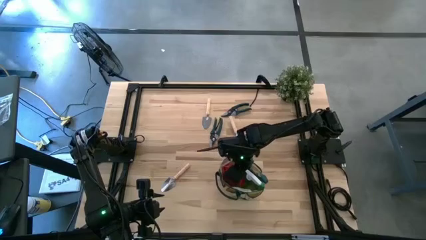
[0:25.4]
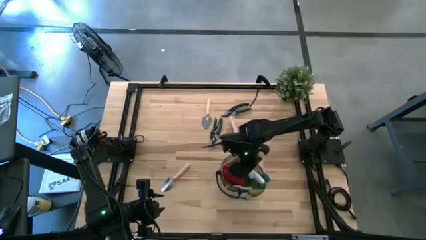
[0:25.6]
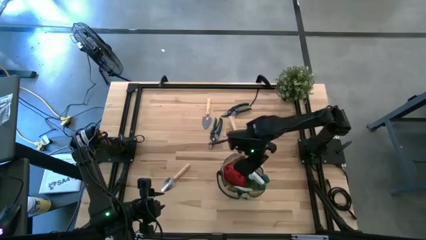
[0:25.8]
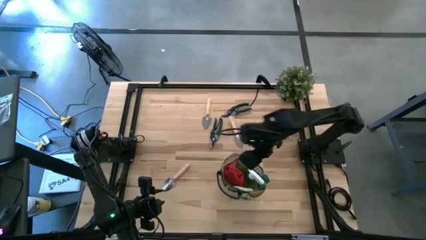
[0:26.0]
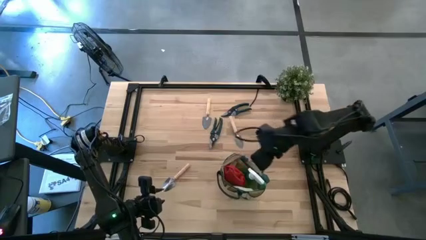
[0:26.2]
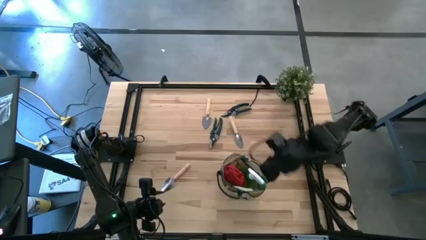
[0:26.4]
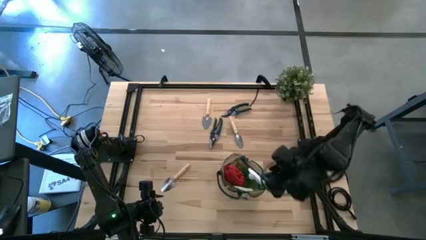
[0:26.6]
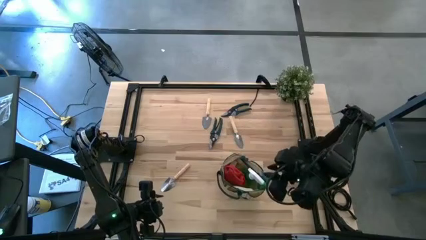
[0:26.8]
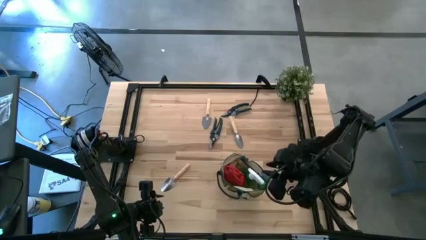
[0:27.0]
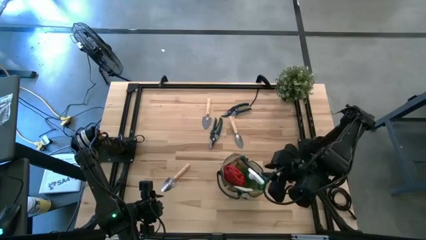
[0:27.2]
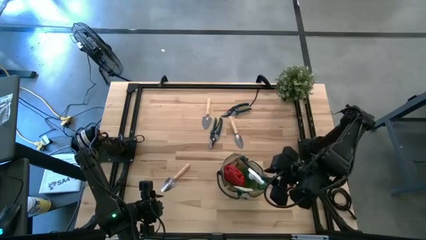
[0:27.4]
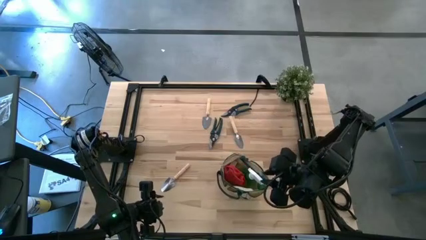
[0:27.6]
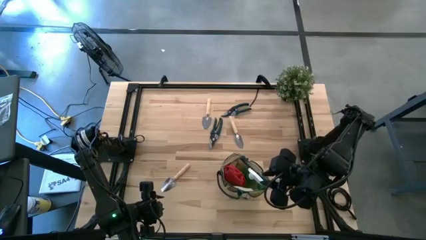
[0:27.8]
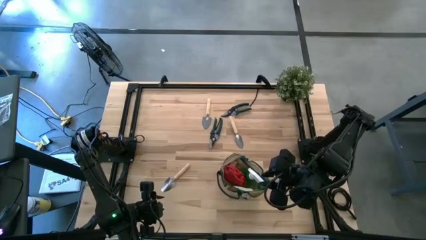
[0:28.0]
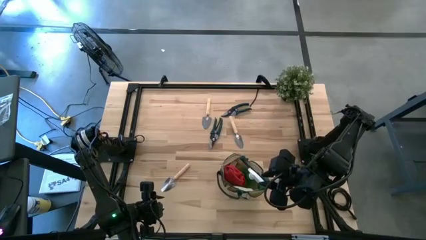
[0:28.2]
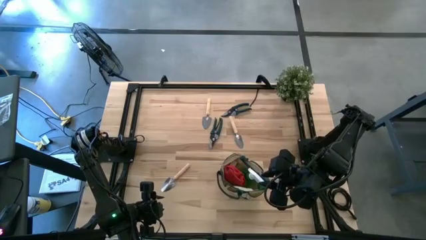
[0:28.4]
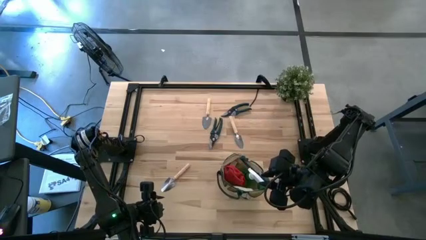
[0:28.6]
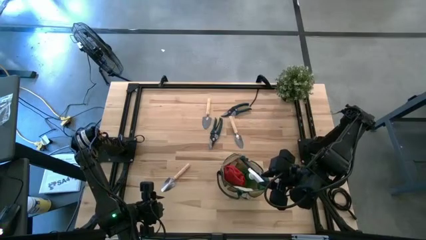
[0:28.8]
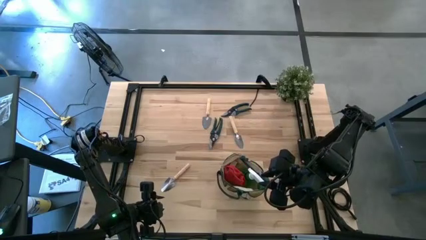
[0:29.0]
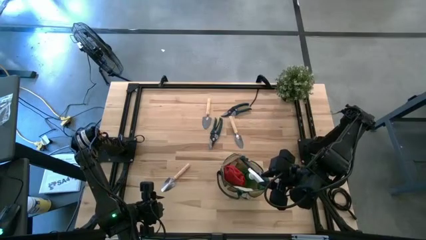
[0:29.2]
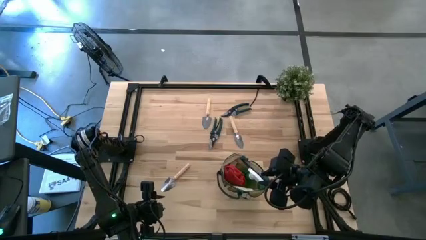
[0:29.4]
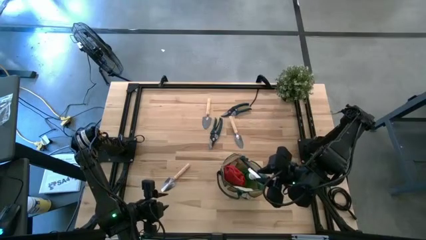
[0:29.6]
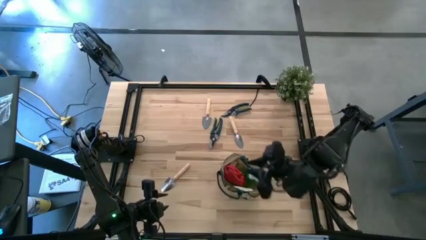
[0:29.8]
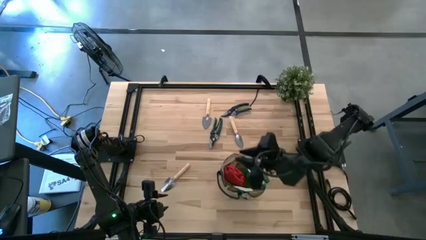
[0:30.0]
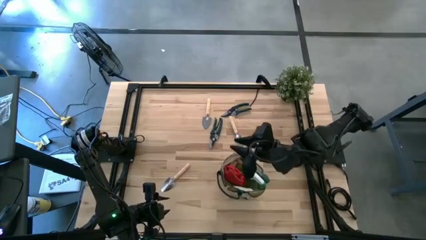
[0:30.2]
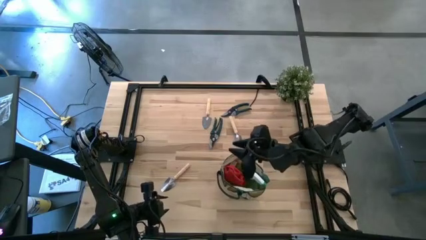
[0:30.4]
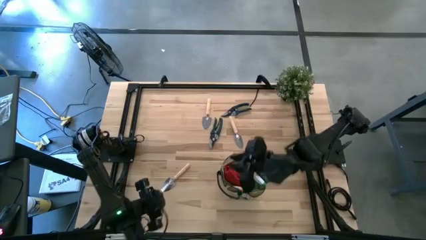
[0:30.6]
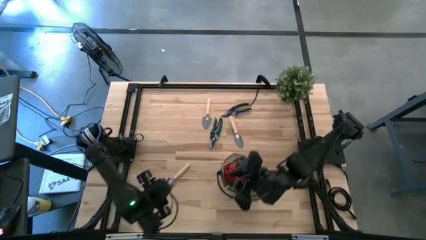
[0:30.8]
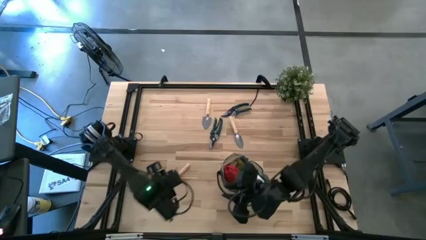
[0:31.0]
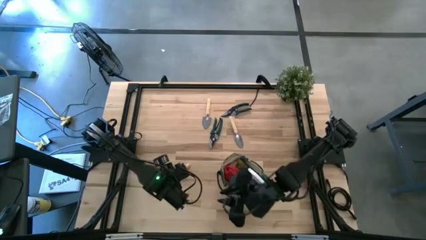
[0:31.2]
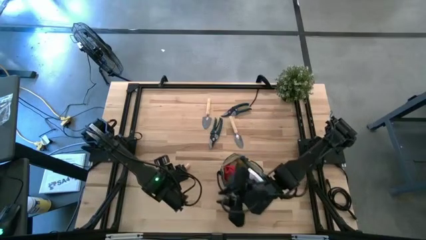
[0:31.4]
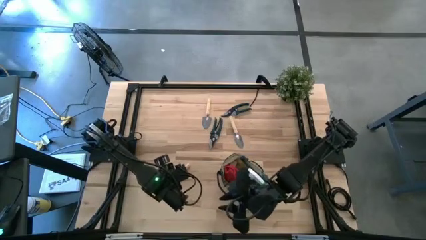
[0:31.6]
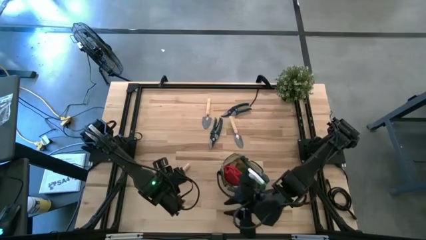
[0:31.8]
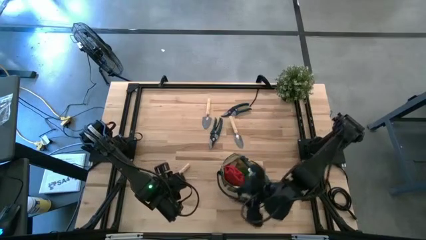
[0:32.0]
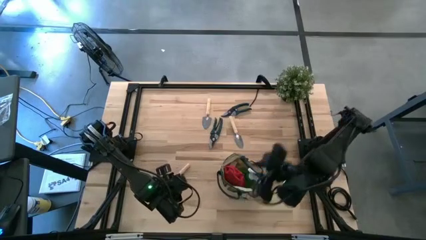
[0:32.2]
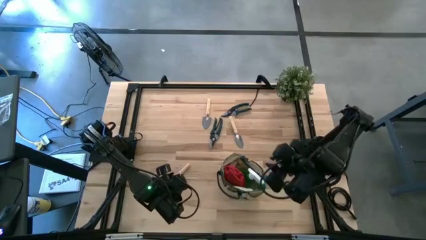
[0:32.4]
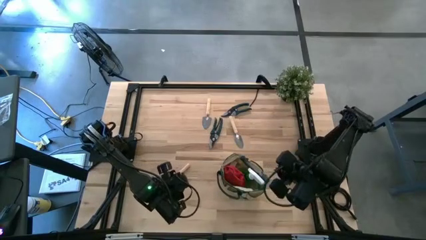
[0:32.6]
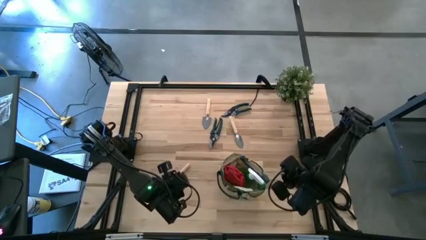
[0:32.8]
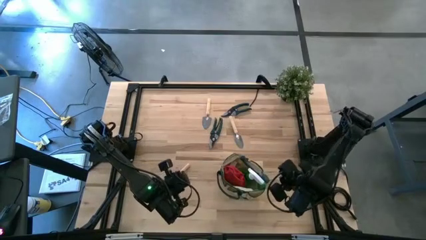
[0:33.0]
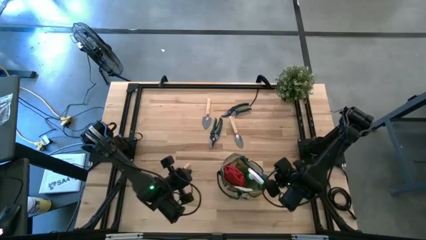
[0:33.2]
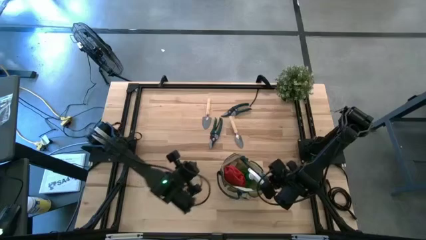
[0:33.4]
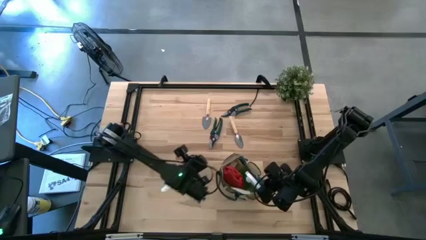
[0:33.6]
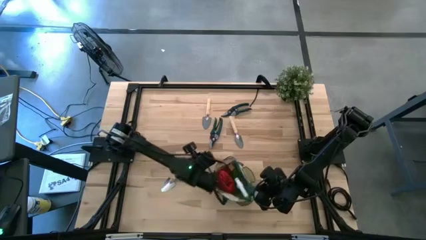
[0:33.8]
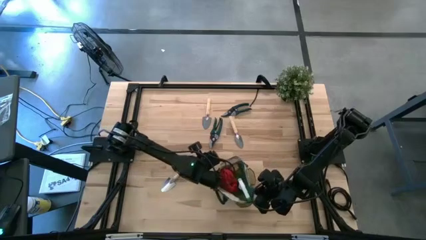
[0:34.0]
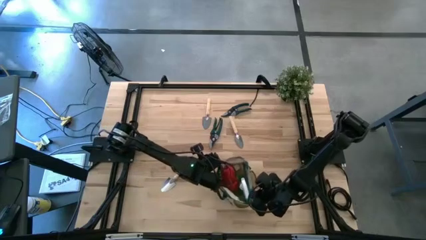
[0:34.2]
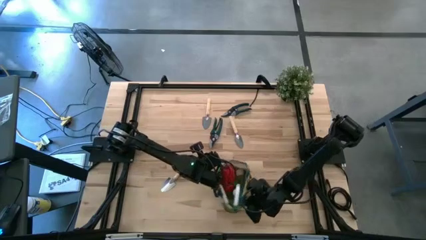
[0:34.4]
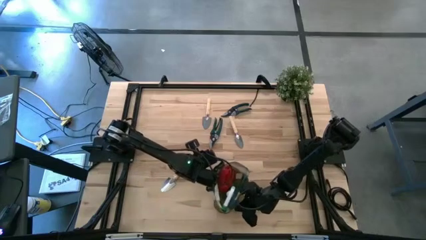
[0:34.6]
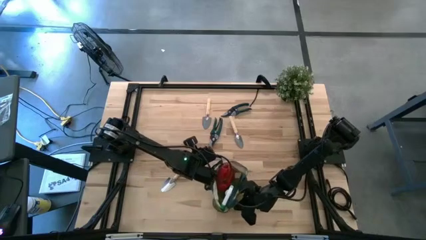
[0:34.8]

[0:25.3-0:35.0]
Task: Pick & Place Garden tools in Gardening bag
Adjust the gardening bag

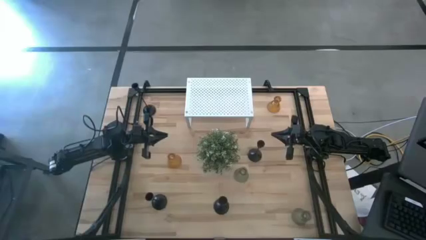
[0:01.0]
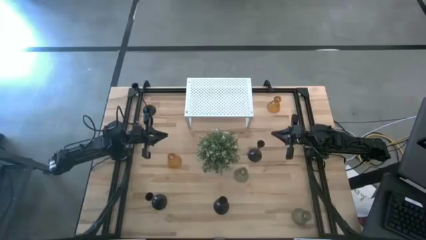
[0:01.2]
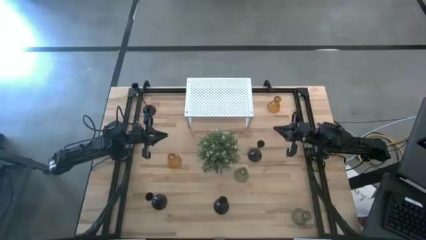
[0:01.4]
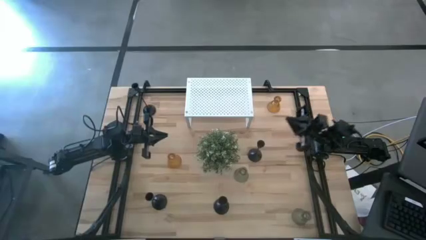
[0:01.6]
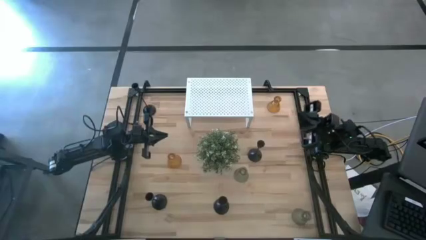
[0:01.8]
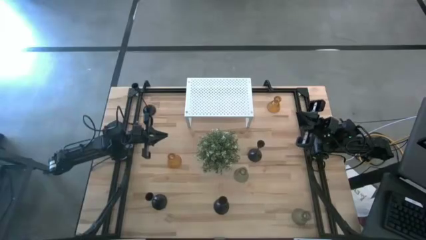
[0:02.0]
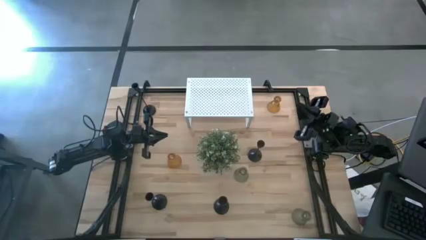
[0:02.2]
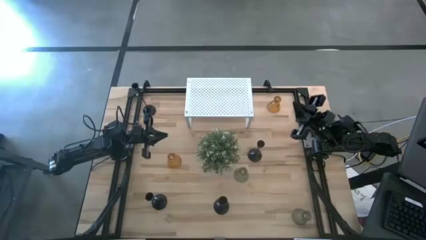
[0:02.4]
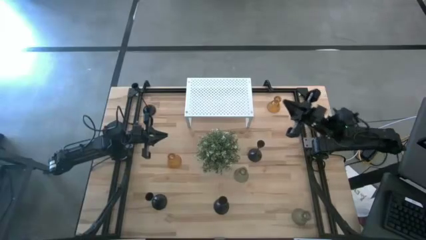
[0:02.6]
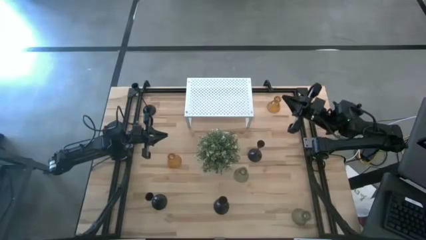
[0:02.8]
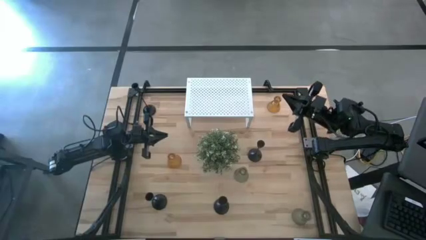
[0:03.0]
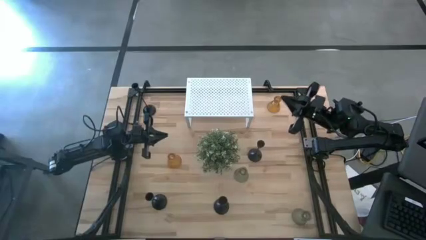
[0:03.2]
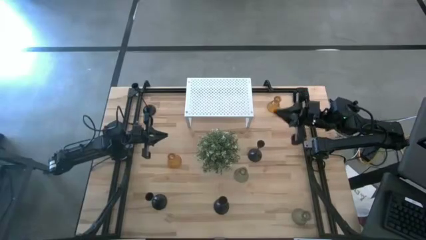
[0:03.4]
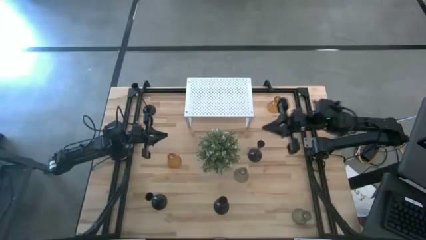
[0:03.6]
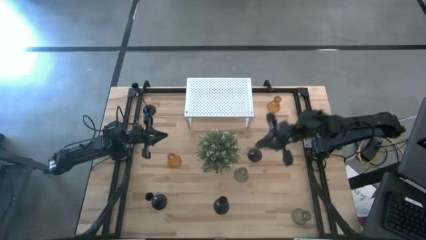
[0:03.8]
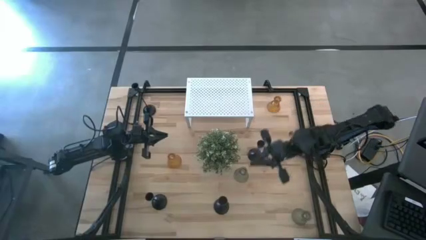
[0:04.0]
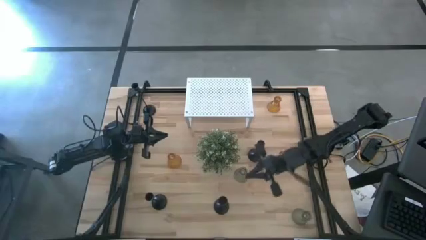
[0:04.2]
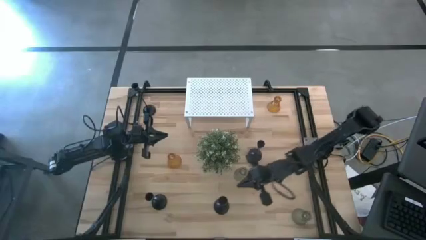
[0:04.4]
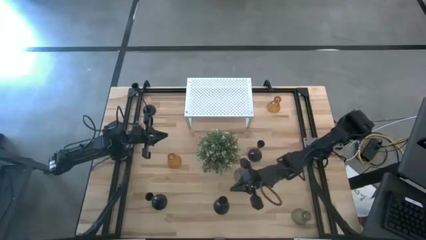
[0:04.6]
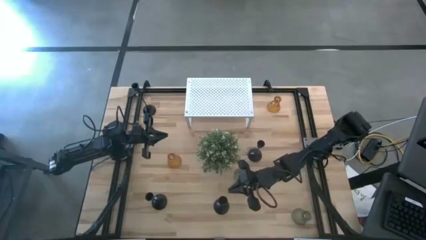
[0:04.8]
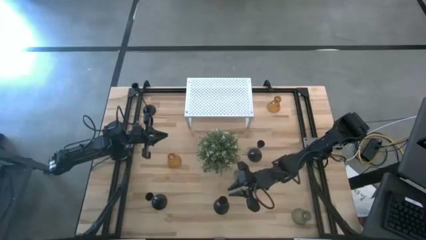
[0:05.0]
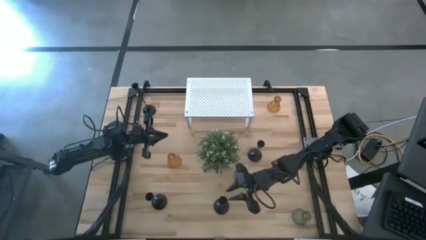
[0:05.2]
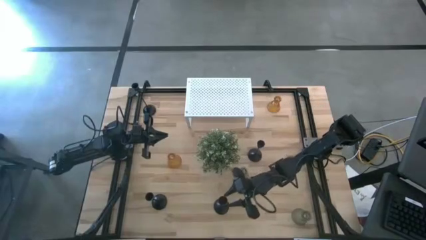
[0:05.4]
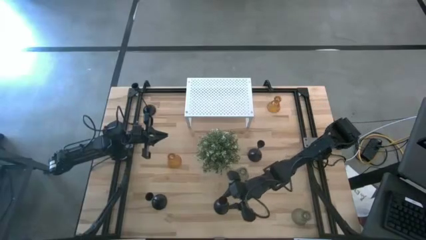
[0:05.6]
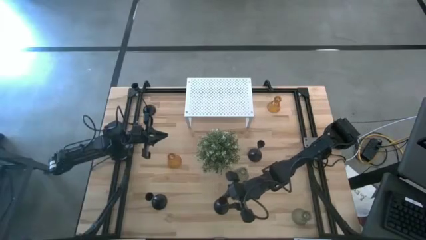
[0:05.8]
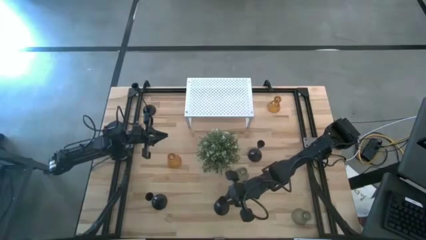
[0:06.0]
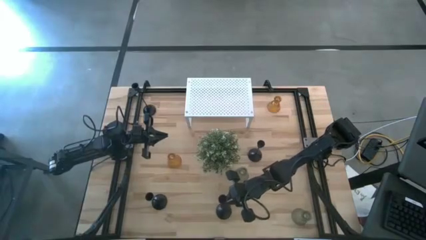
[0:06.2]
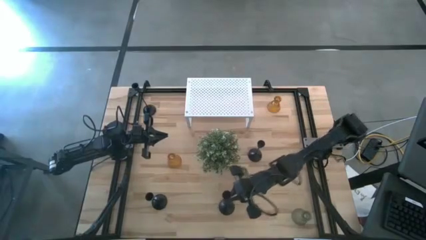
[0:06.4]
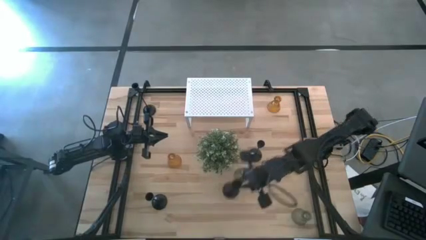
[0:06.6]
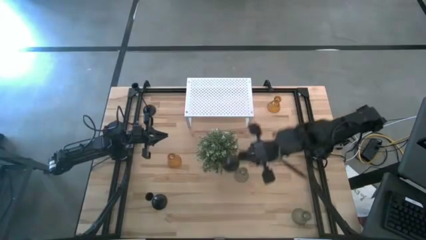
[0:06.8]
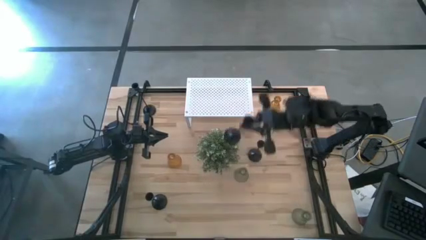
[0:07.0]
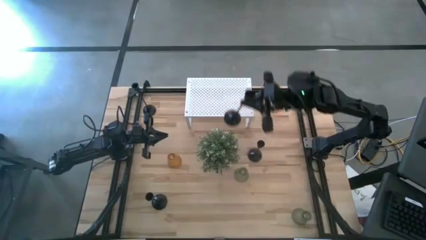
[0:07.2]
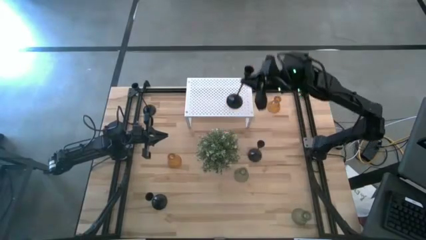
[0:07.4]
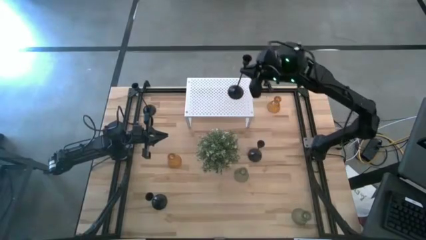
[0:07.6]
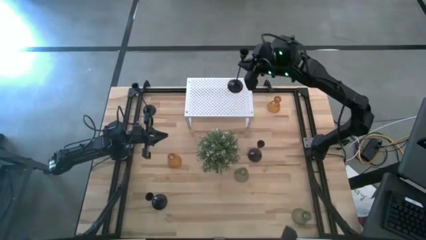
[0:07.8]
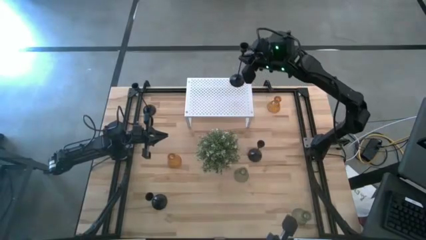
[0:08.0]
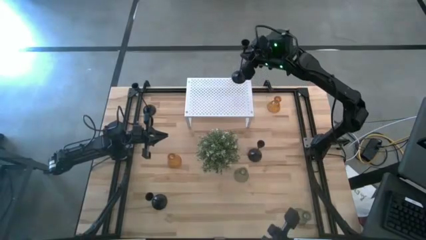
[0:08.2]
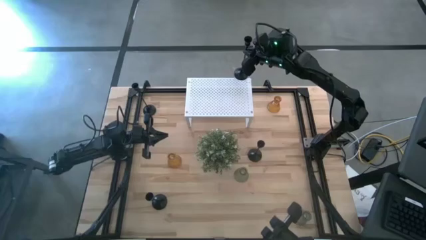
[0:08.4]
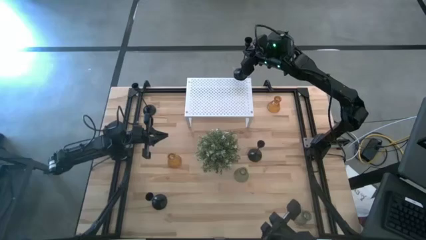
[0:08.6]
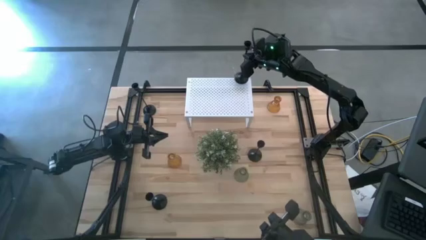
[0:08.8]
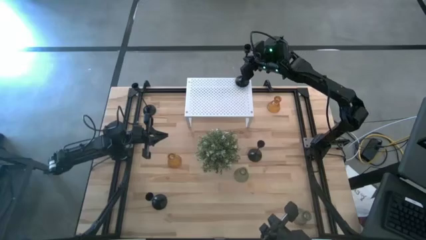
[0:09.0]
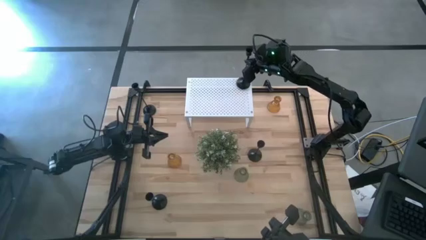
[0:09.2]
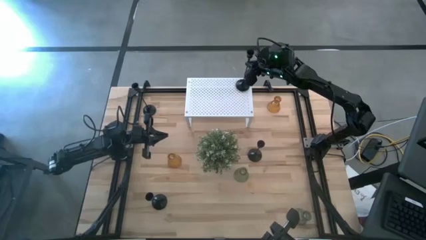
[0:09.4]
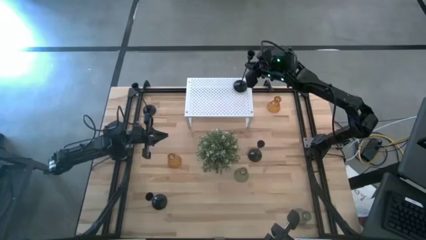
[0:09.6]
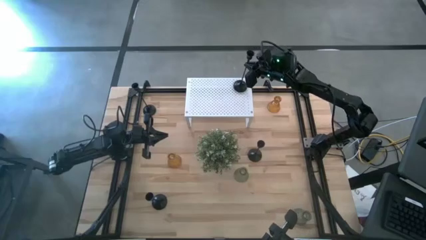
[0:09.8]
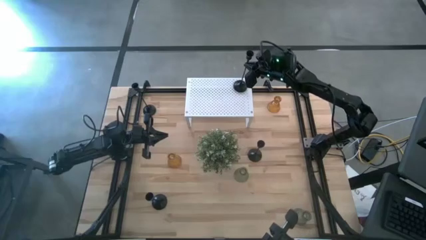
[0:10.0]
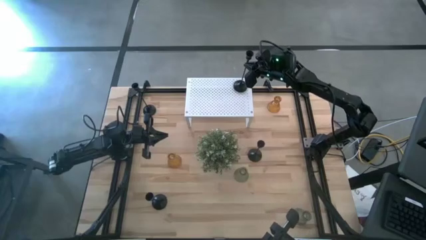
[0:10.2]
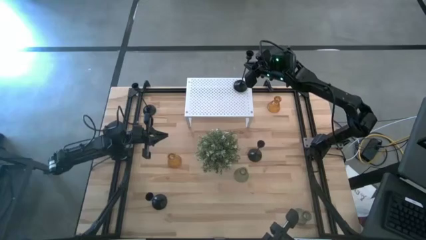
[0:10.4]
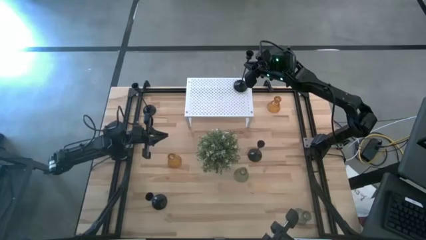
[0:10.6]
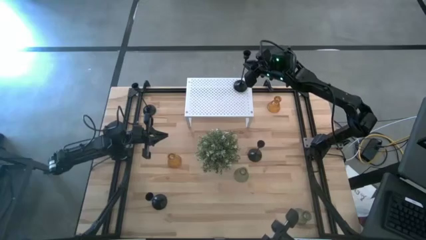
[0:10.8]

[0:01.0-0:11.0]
Task: Pick & Place candle stick holders
Put the bottom right black candle holder on the shelf
